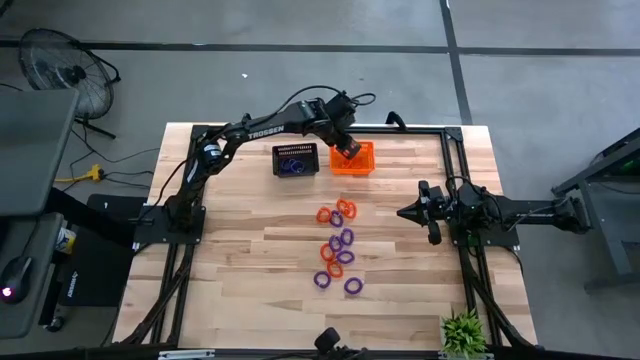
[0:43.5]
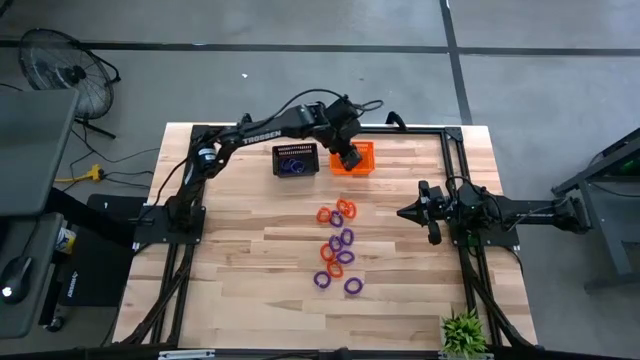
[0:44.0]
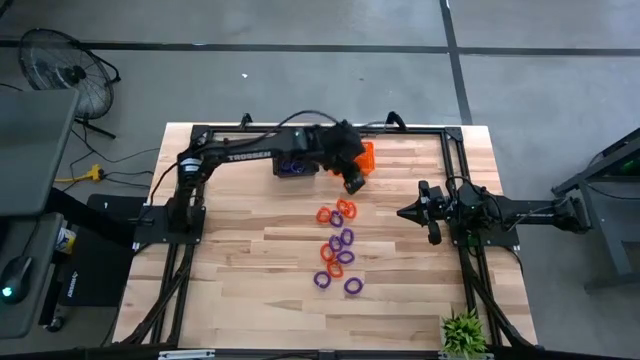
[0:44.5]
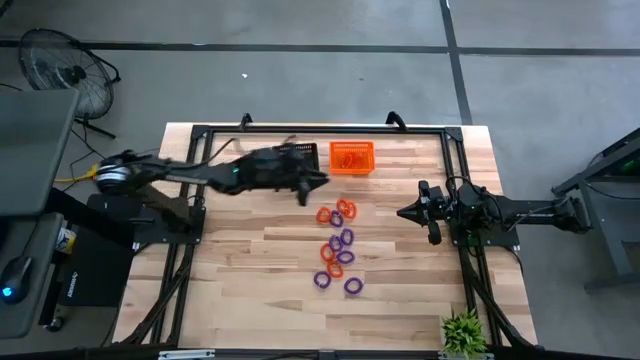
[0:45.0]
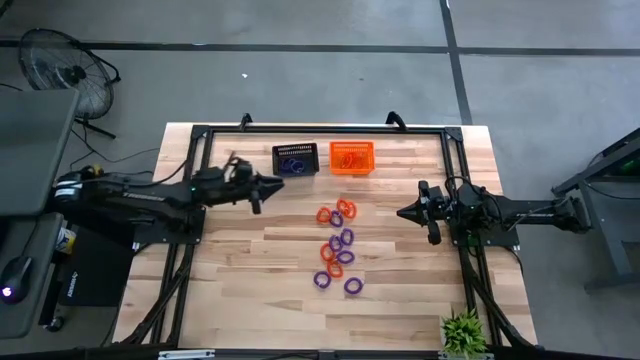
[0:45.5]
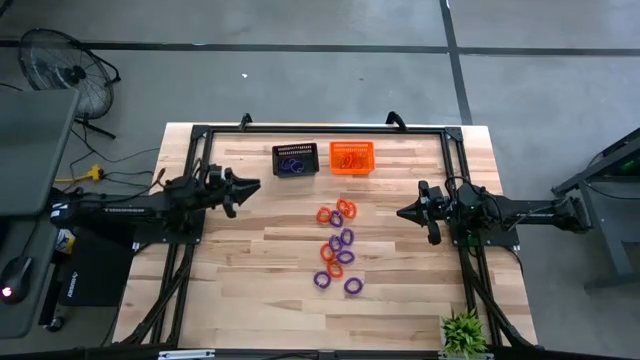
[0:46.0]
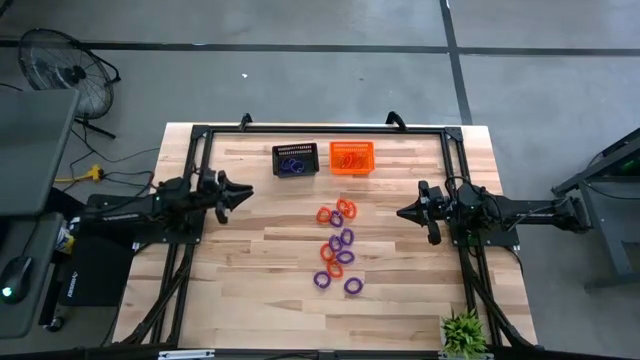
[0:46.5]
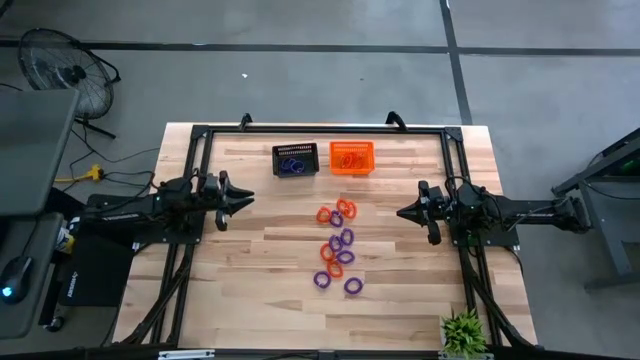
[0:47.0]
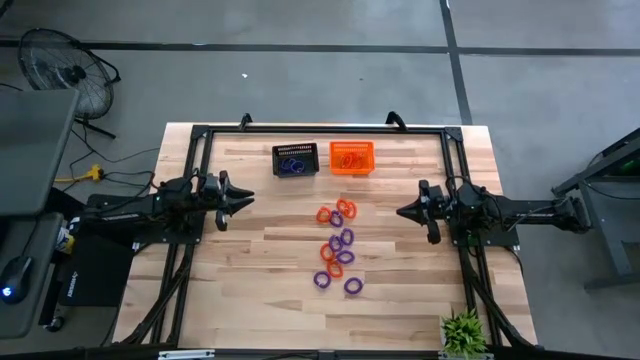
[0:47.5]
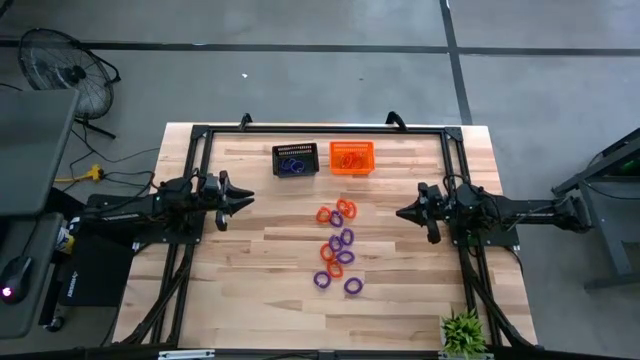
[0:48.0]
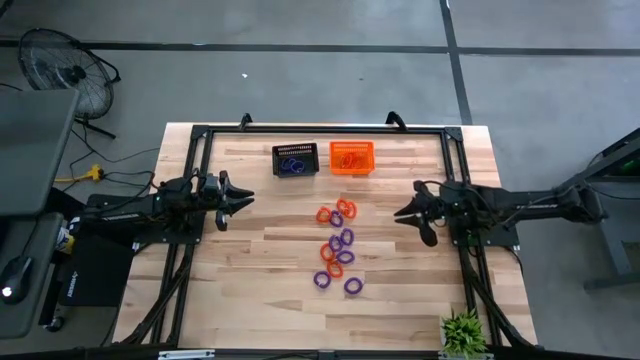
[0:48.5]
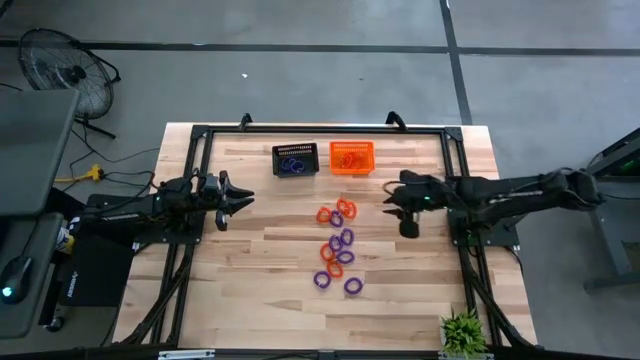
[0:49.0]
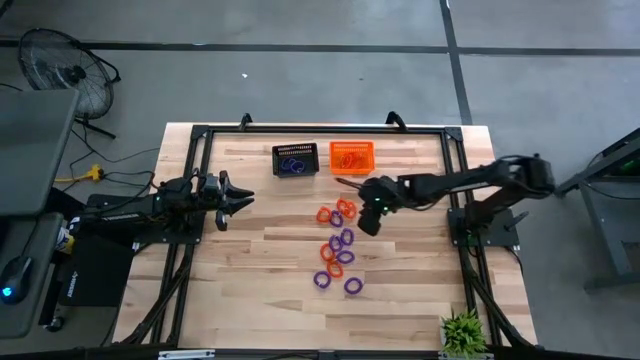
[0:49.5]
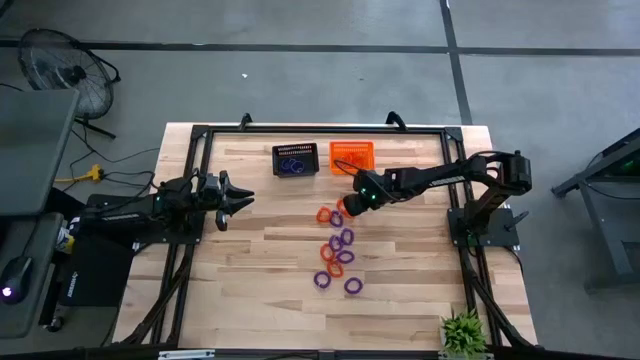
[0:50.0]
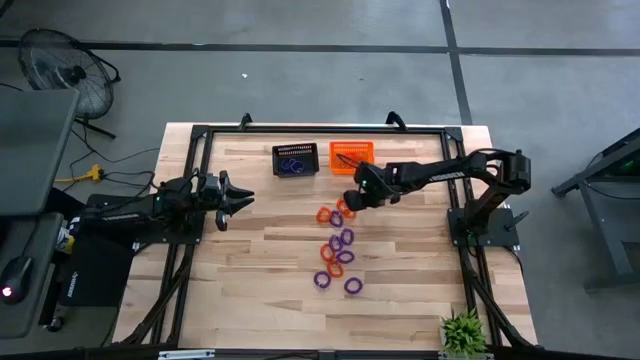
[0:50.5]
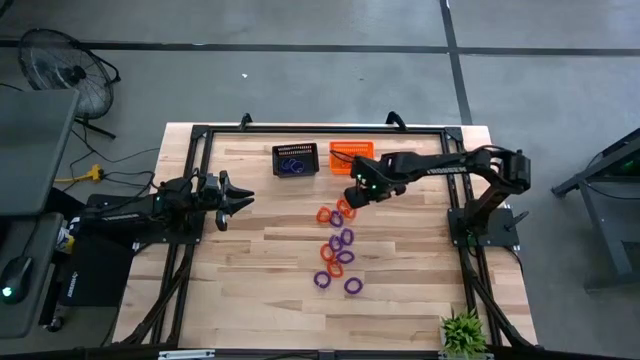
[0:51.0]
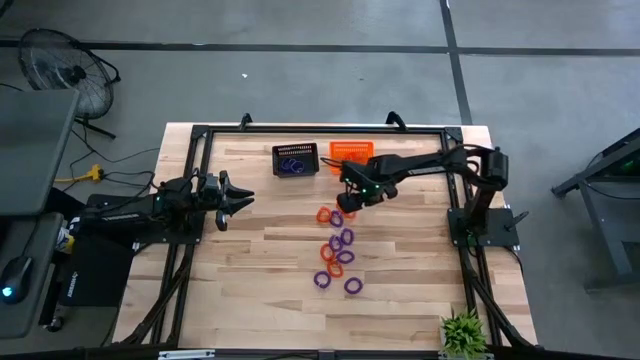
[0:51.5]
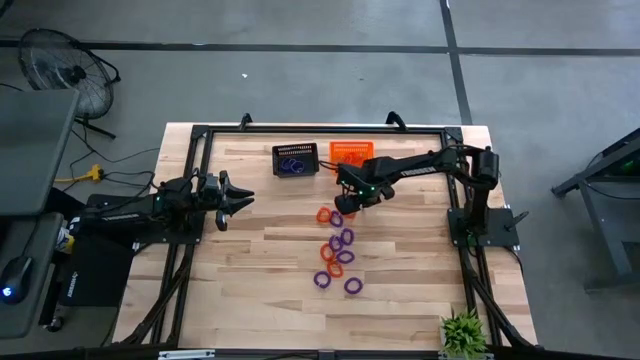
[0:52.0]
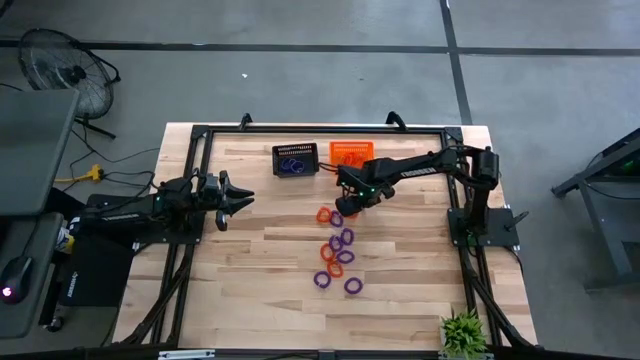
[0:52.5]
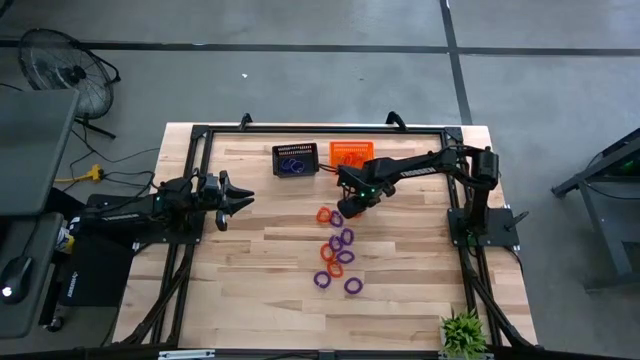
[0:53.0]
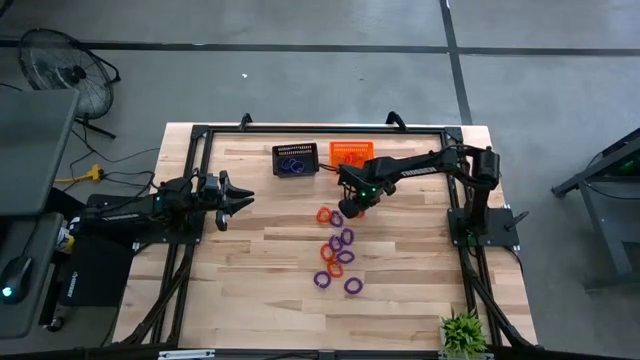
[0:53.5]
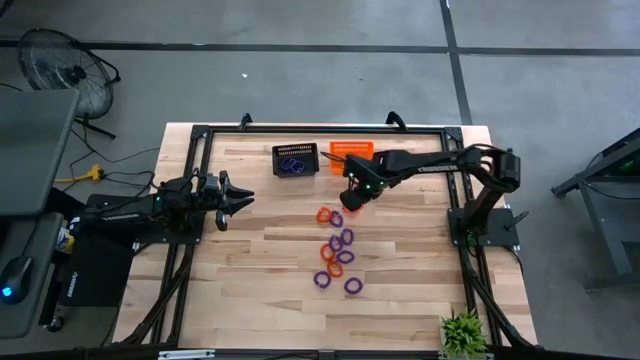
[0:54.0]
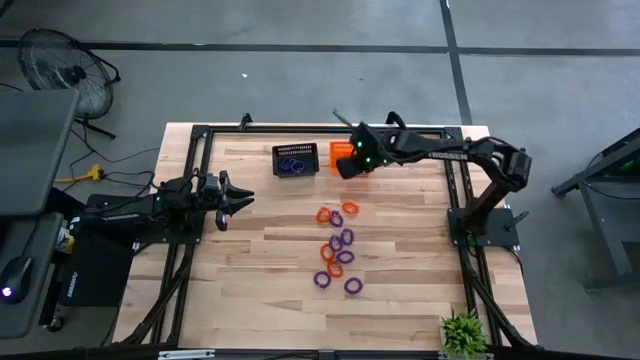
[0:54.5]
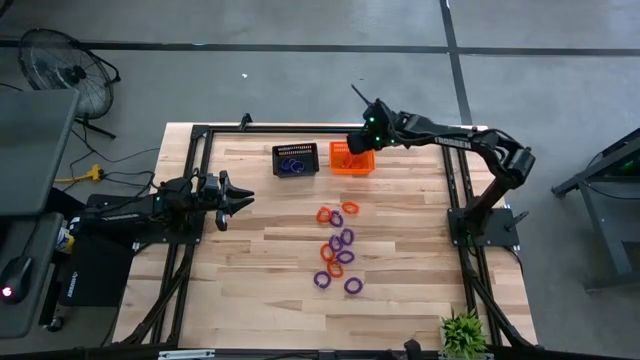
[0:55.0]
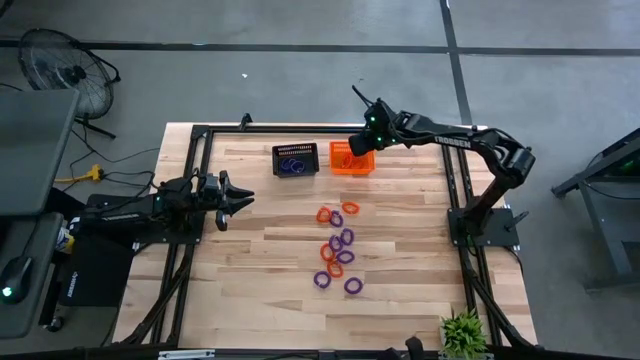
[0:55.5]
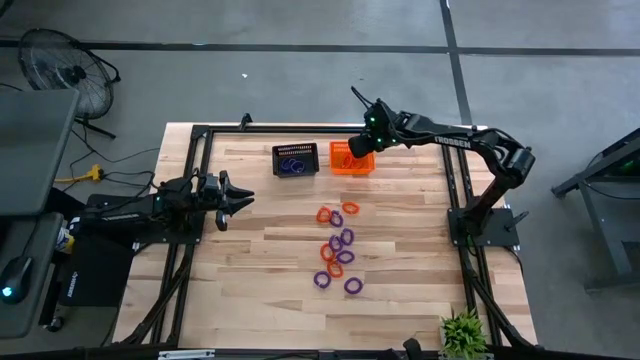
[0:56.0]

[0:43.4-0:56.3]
Task: Sort spring keychains
Put the orange spring keychain into the orange bin

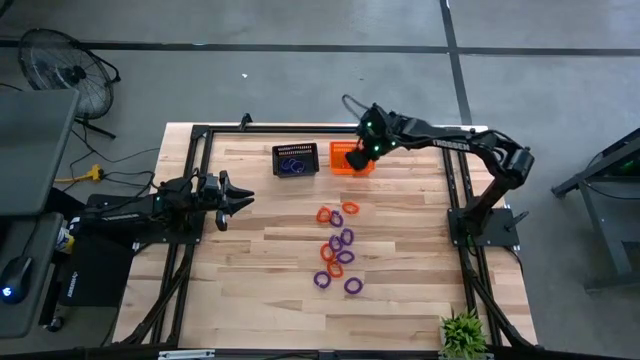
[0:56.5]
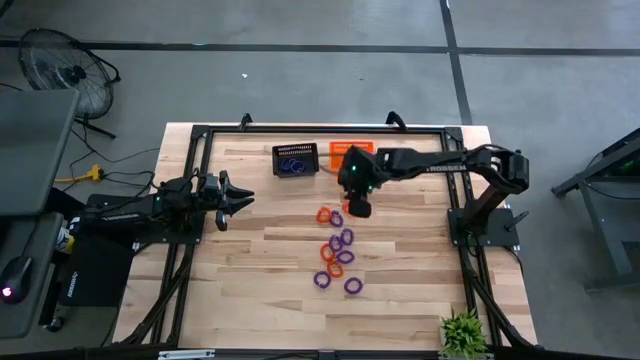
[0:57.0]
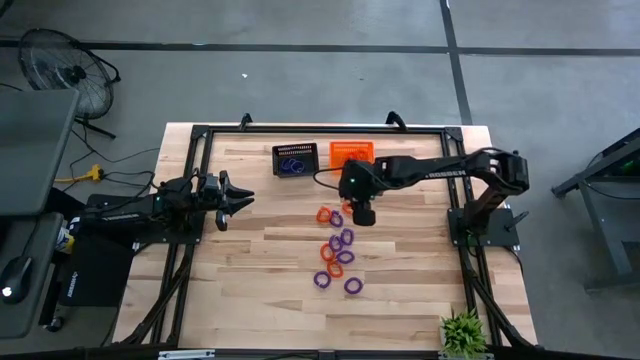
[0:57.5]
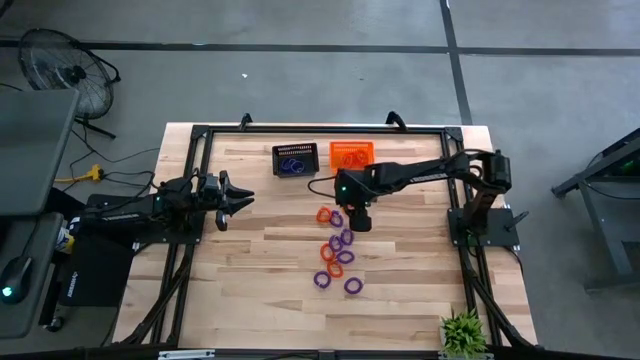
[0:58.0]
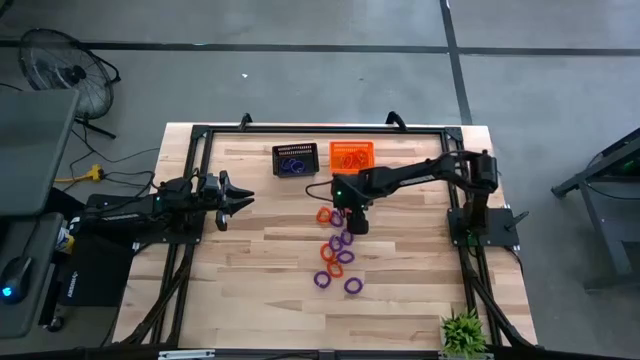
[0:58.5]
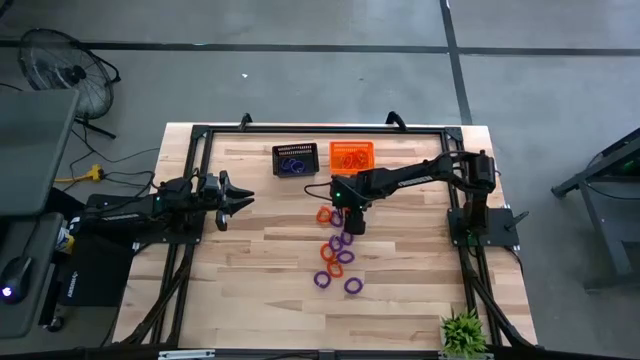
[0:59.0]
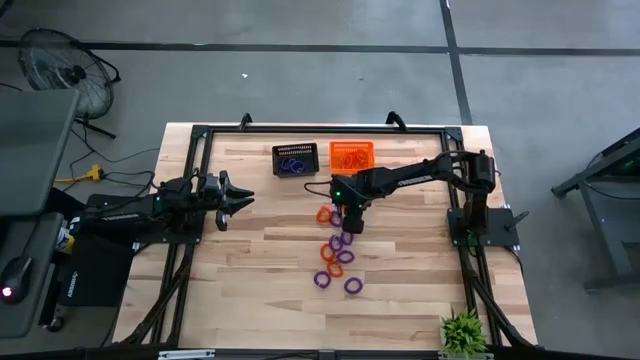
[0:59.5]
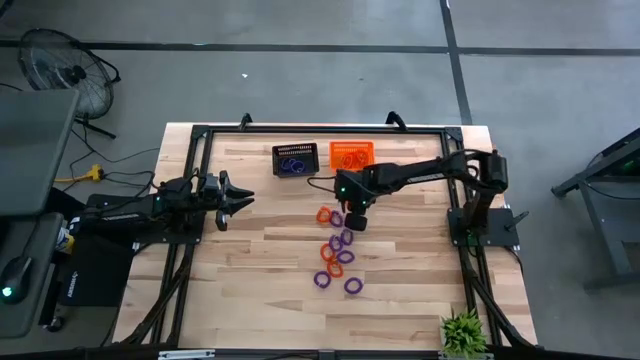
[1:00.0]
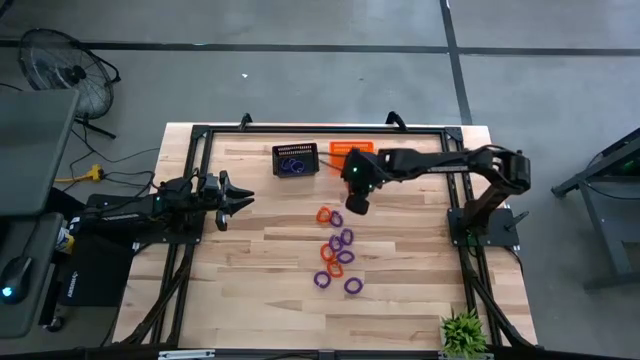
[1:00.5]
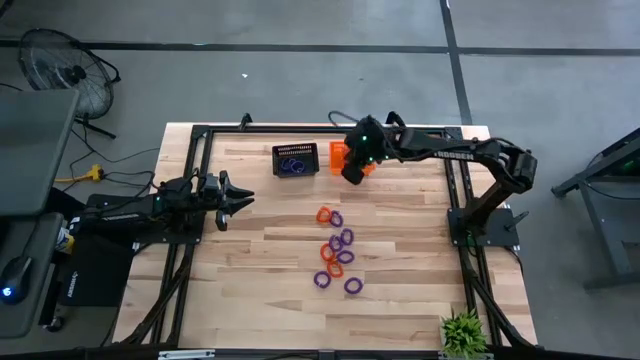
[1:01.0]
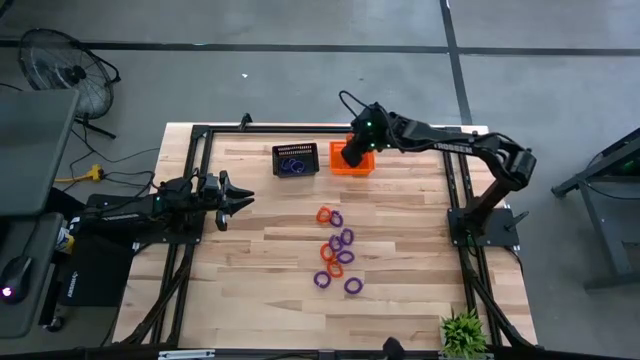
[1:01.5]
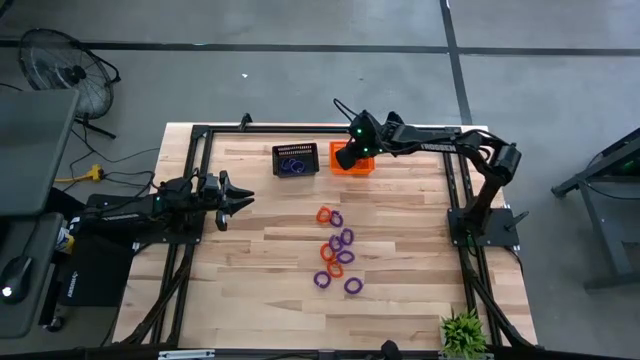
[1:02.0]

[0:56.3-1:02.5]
Put the orange spring keychain into the orange bin

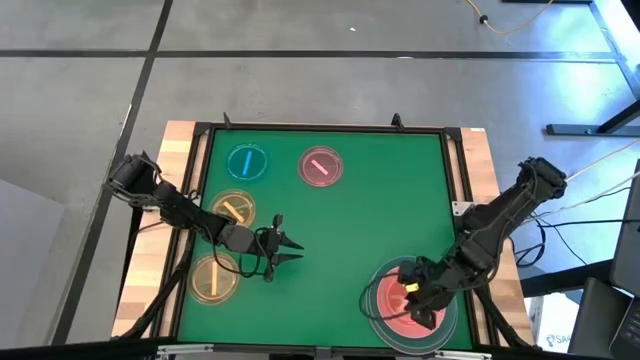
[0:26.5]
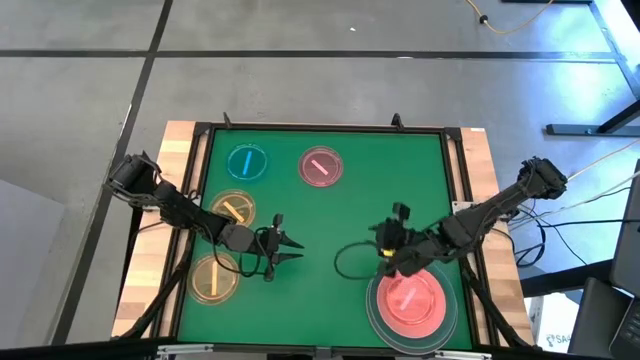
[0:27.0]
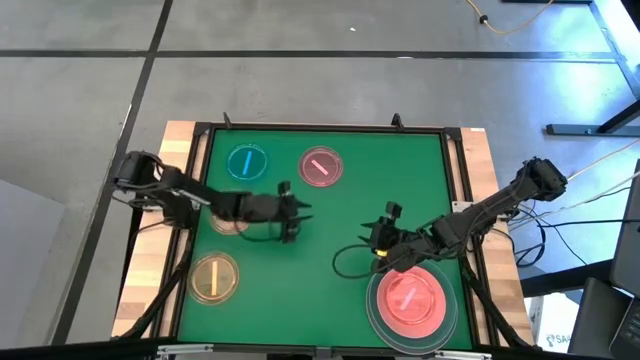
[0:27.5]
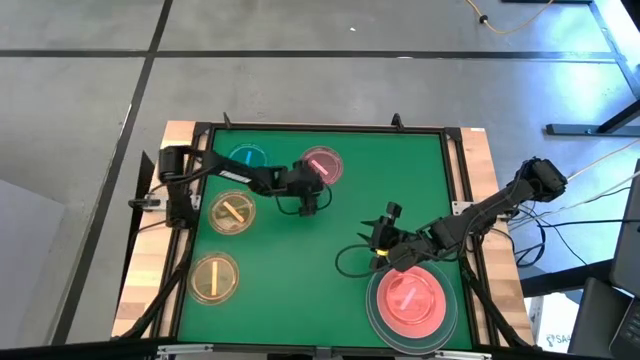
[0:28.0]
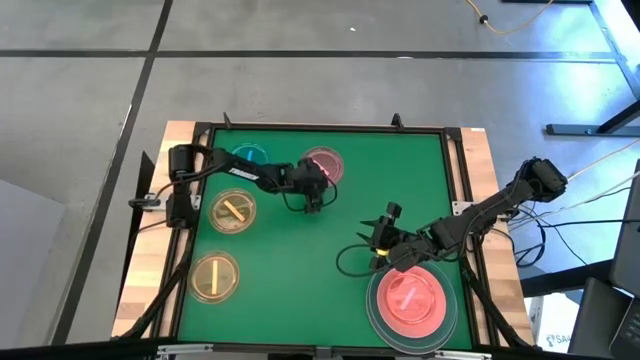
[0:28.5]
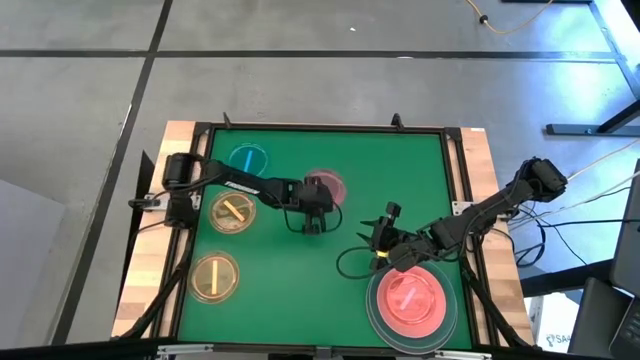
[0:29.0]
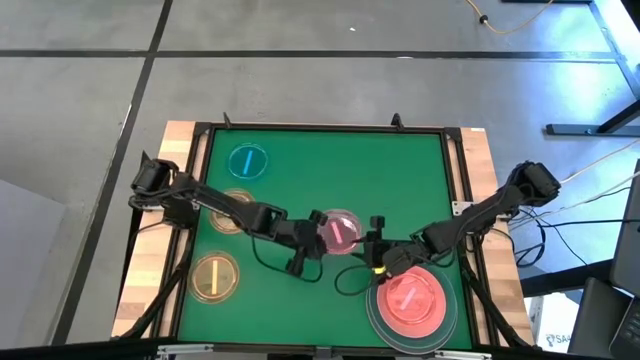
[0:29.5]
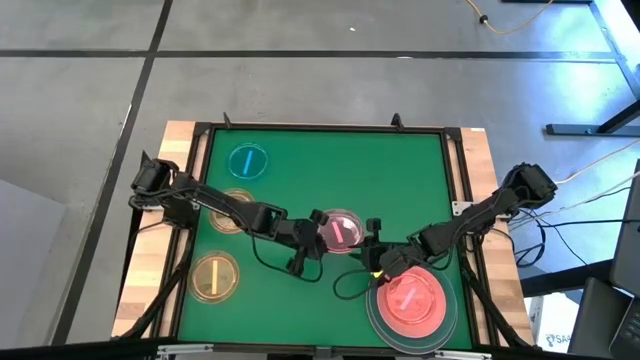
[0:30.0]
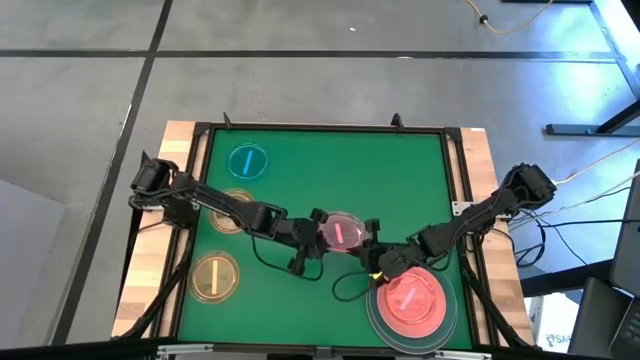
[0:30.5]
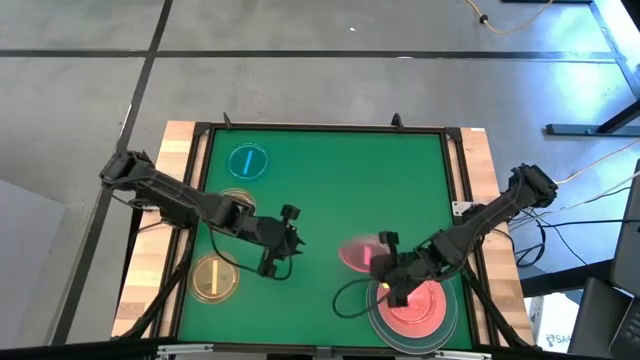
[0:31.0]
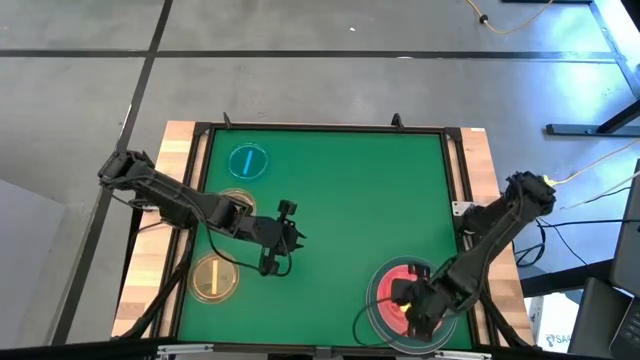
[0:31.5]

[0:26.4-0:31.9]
Task: Stack plastic plates
Stack the transparent pink plate on top of the transparent red plate
